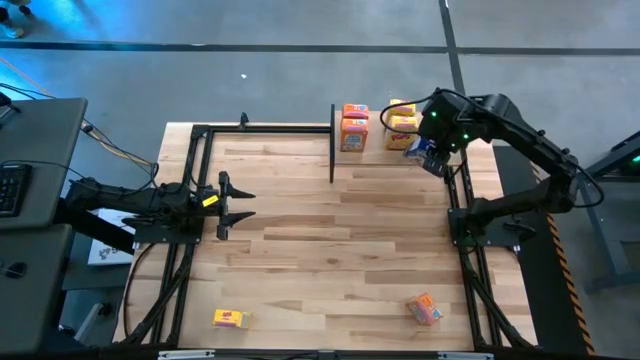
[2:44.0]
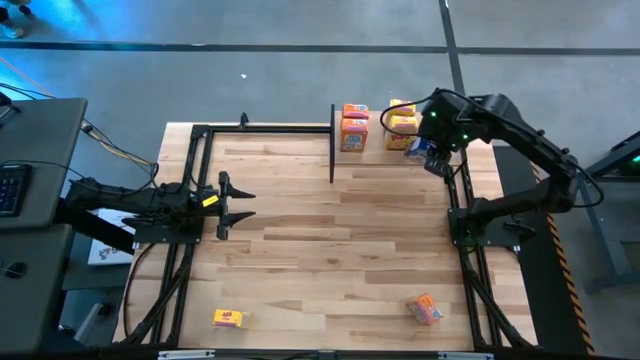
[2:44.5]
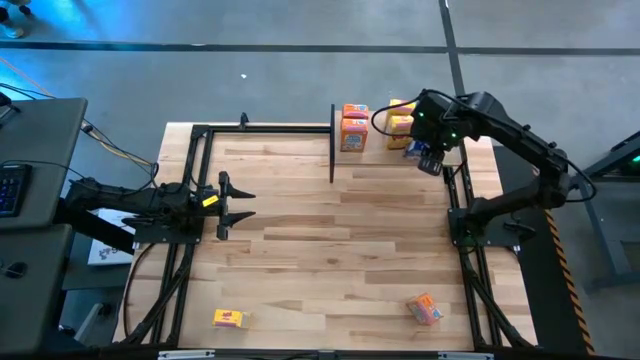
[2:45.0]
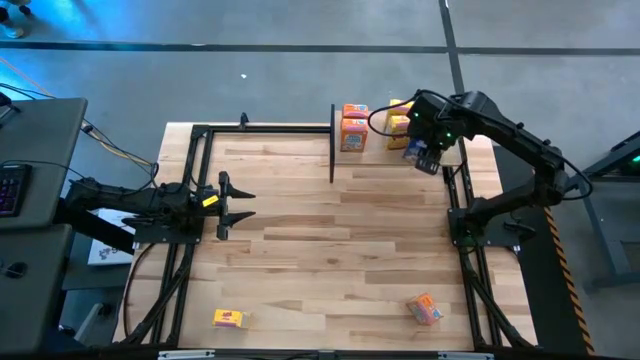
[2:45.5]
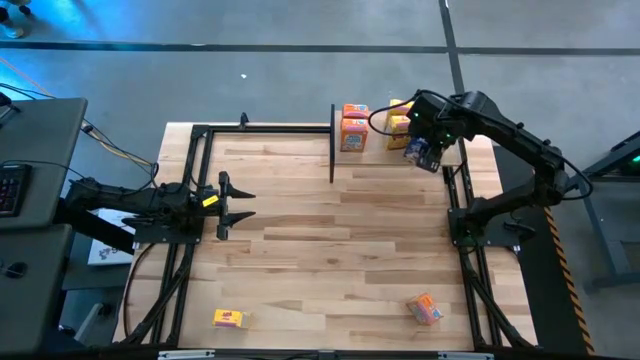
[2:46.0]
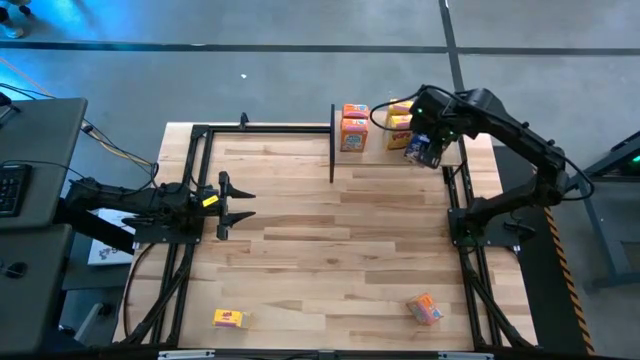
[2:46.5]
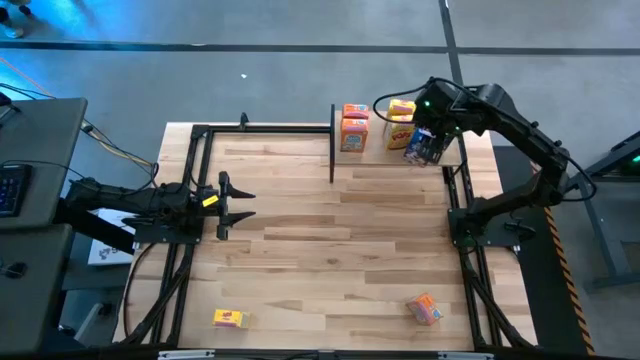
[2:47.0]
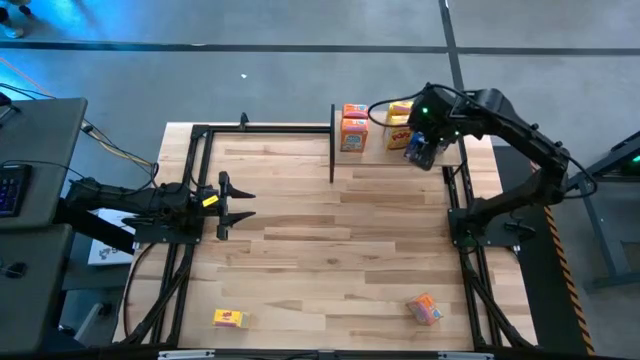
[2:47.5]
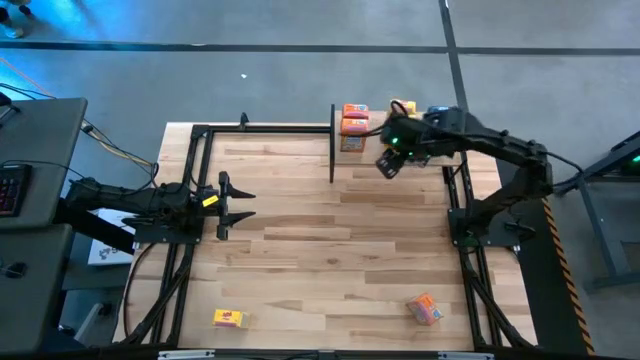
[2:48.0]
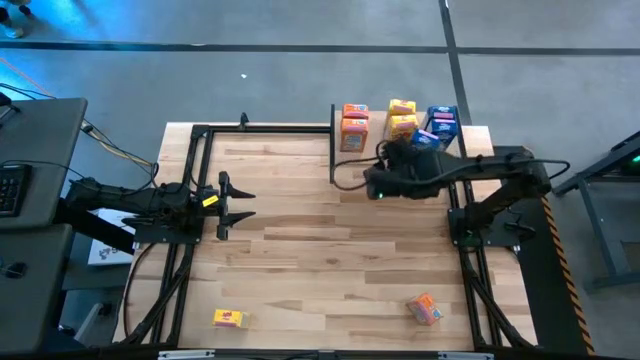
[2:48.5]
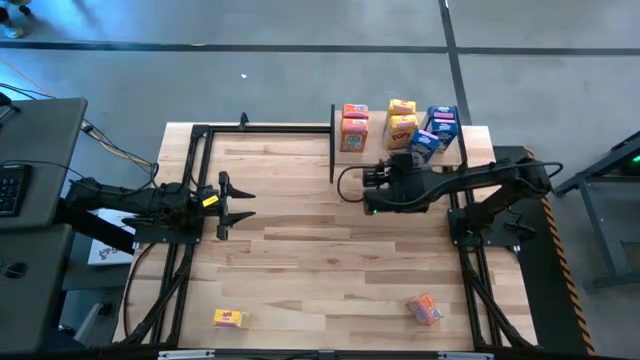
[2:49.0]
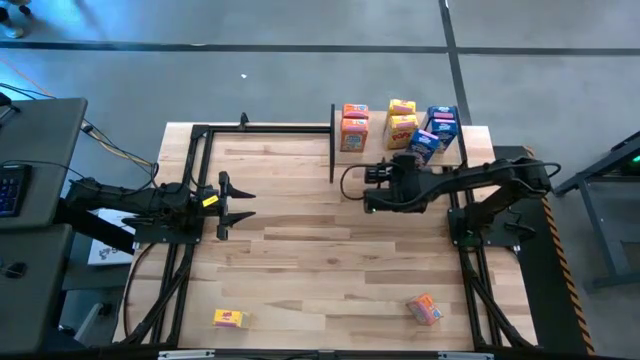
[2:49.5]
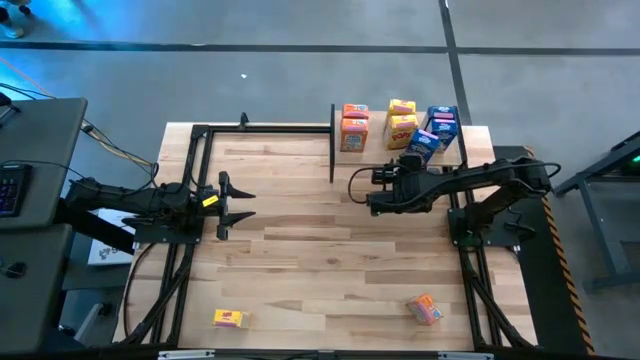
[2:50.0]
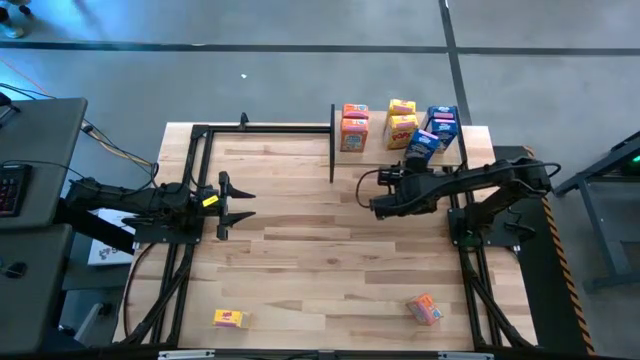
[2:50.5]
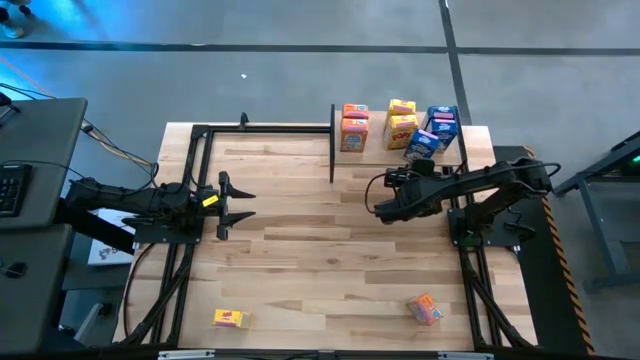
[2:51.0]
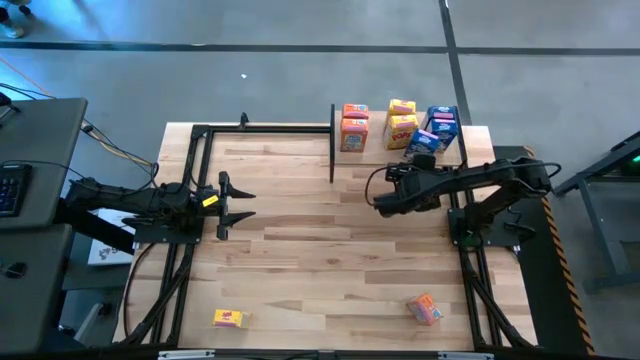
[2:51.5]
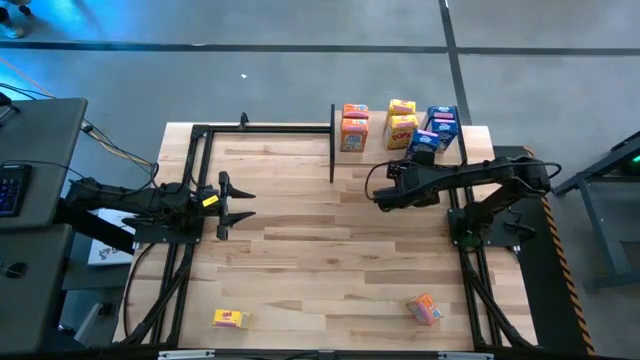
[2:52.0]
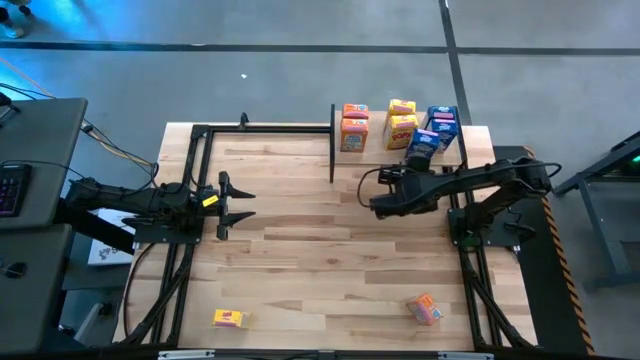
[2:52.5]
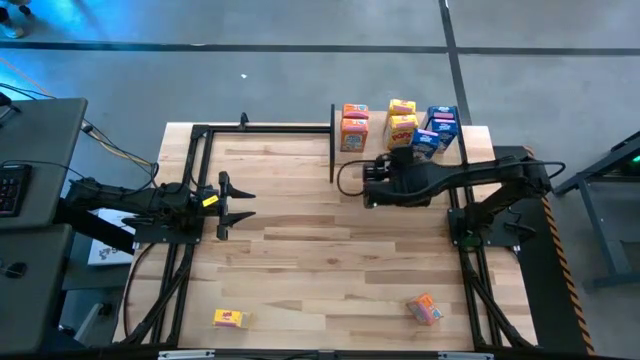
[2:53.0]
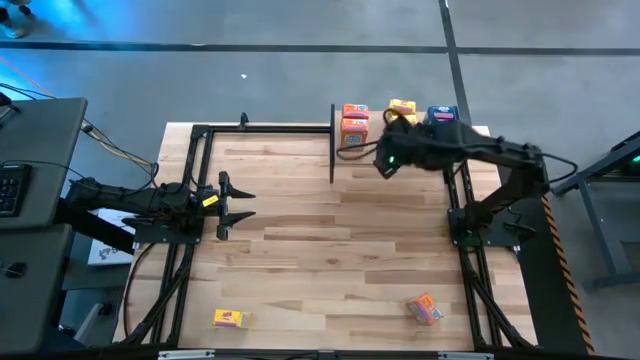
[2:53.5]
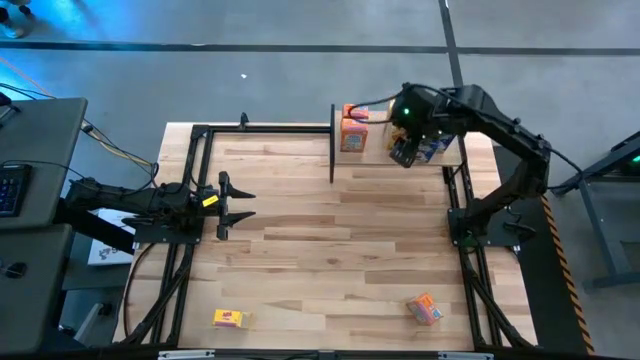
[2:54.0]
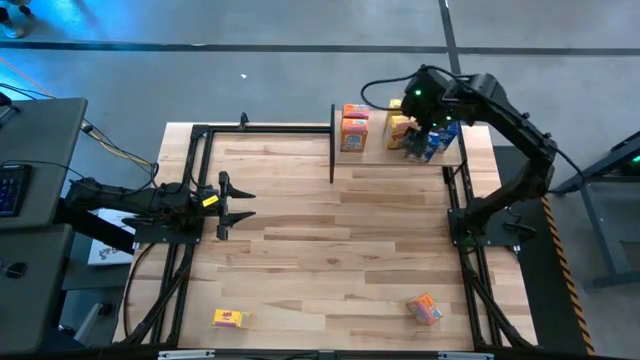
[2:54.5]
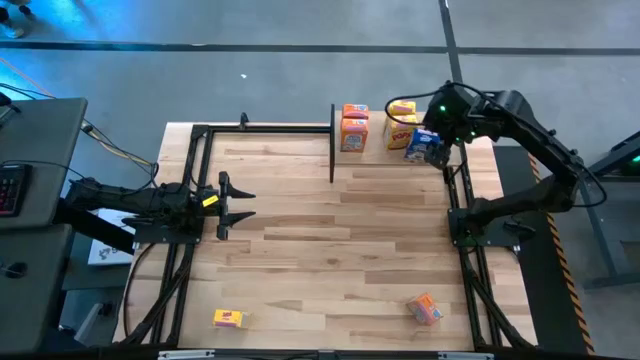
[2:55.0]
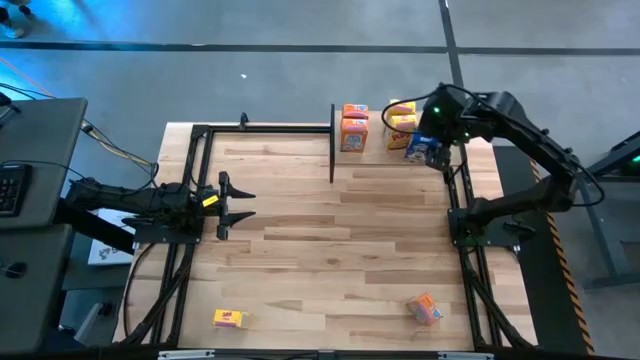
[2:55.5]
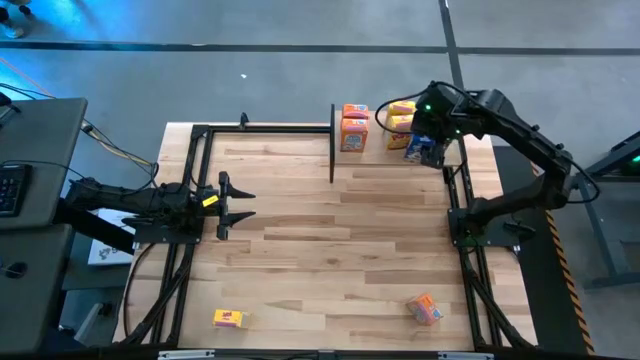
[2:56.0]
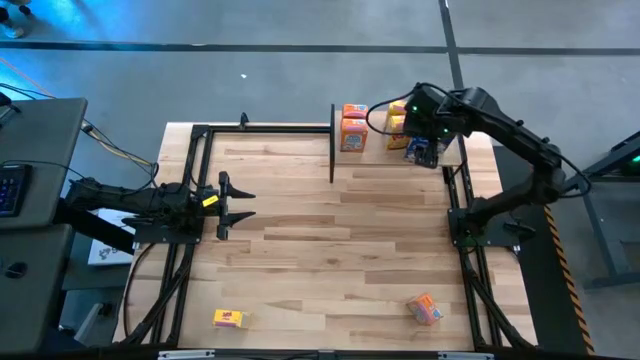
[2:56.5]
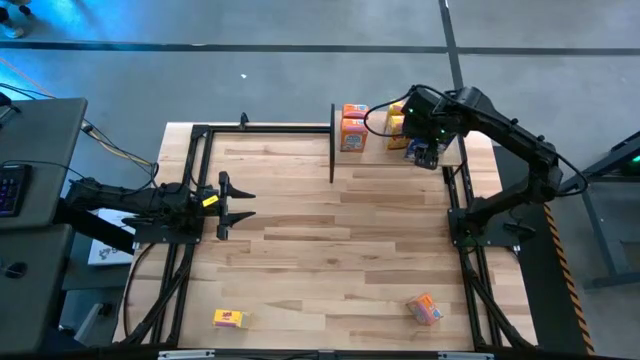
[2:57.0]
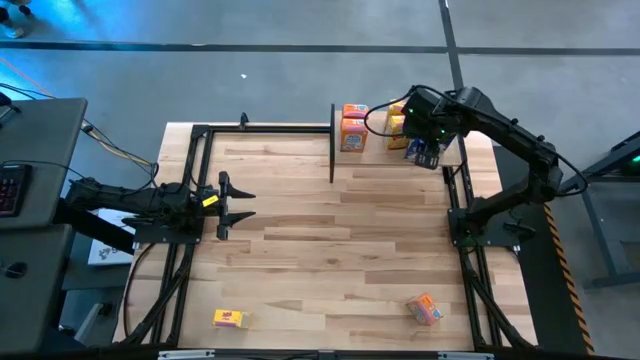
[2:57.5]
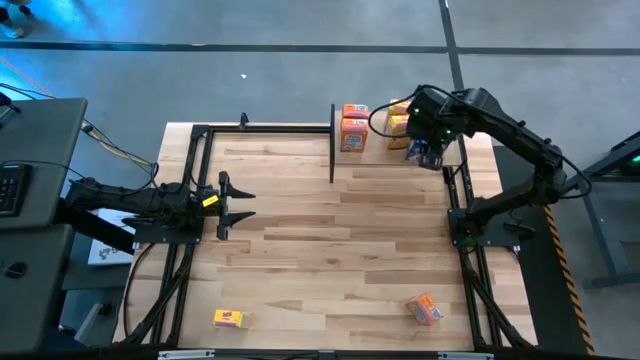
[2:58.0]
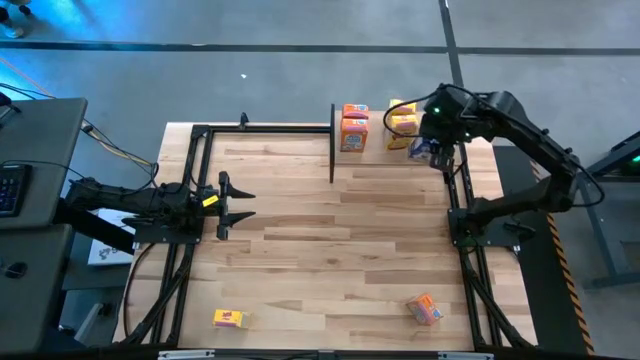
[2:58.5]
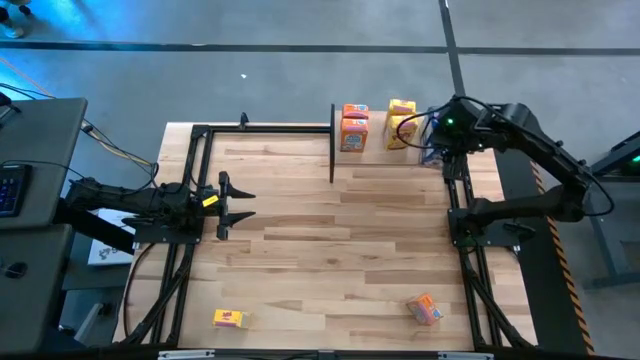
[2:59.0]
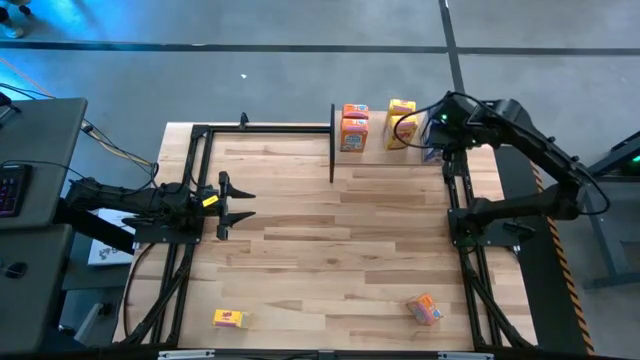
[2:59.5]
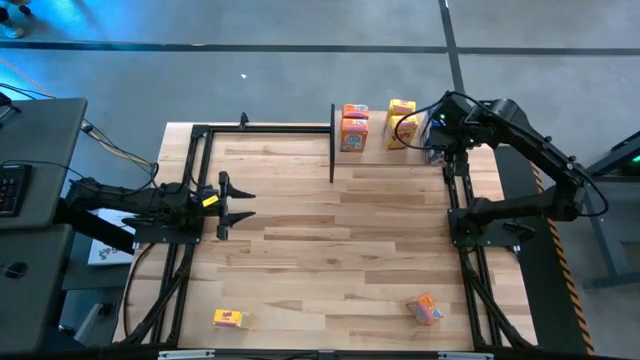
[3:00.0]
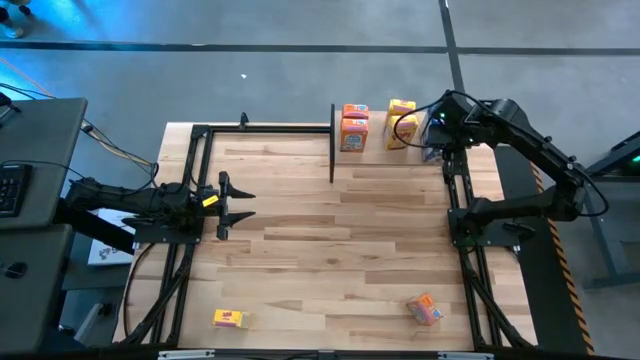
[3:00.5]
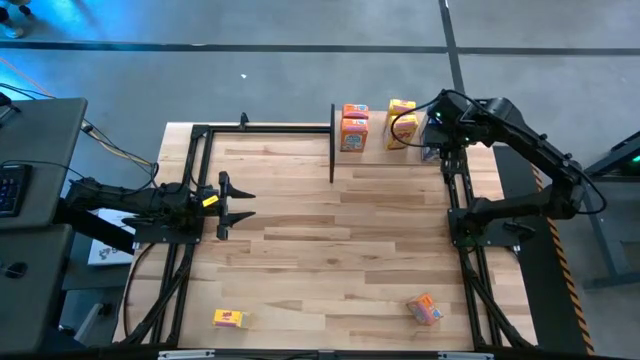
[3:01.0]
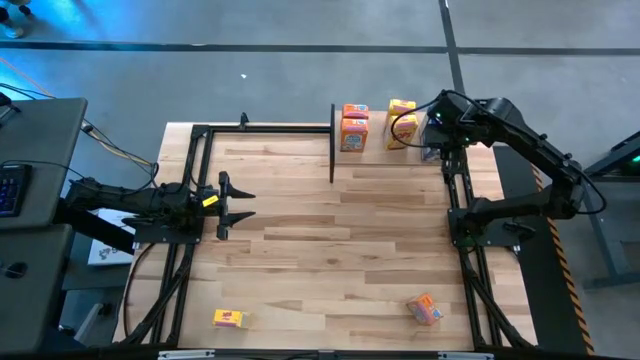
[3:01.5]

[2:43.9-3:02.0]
Task: Stack cereal on shelf
Put the blue cereal box on the shelf aligned with the other blue cereal boxes

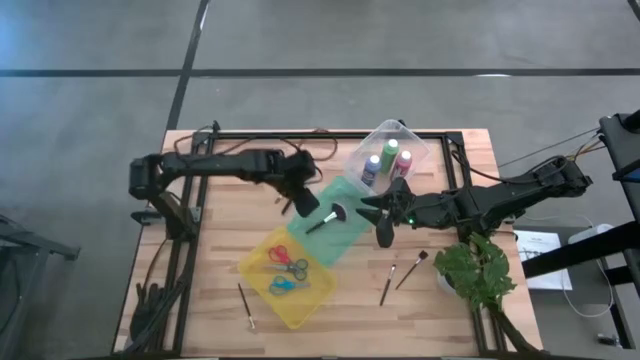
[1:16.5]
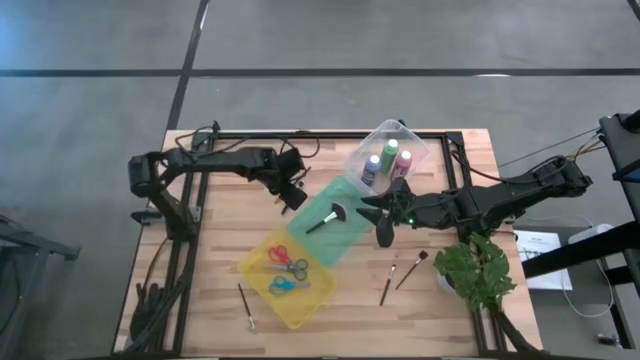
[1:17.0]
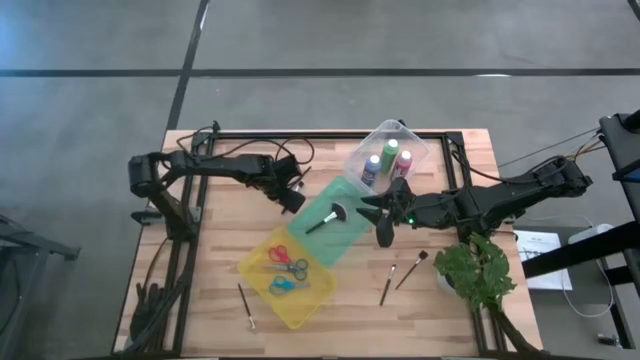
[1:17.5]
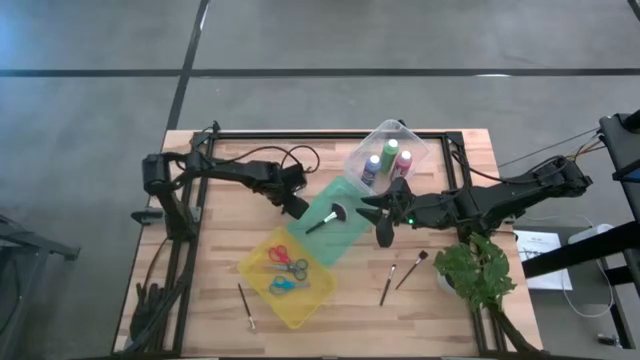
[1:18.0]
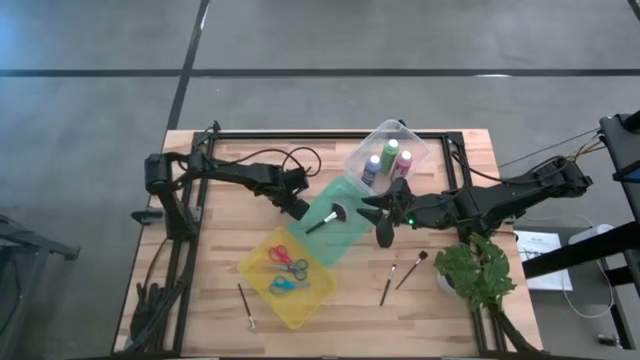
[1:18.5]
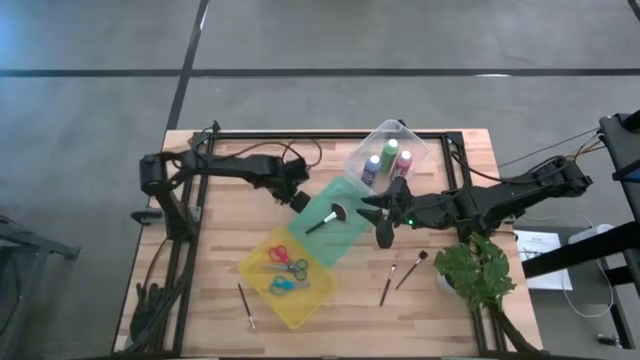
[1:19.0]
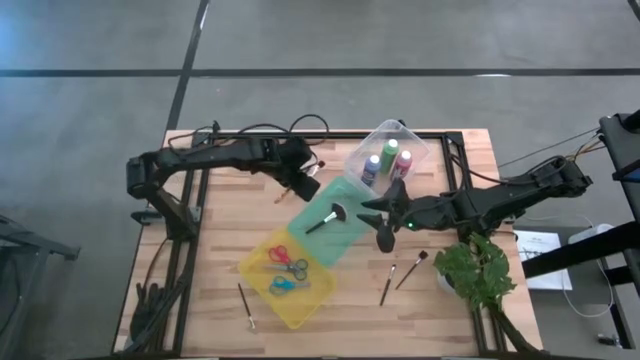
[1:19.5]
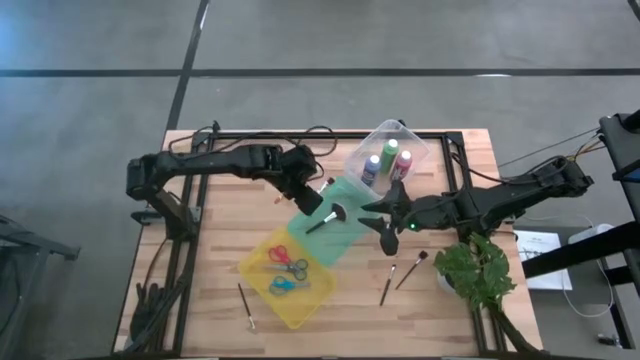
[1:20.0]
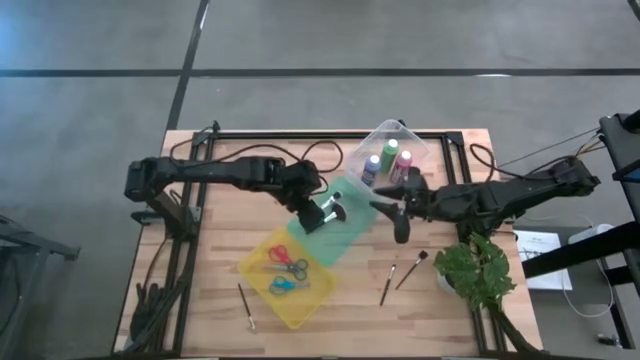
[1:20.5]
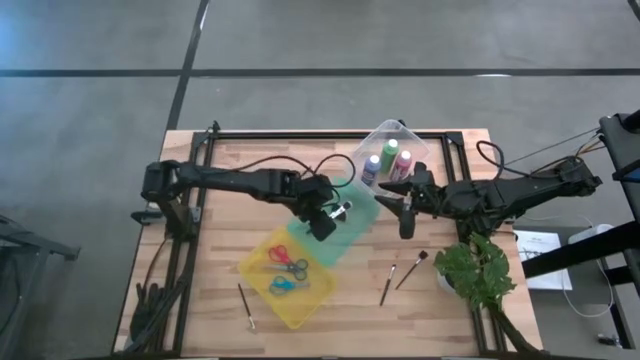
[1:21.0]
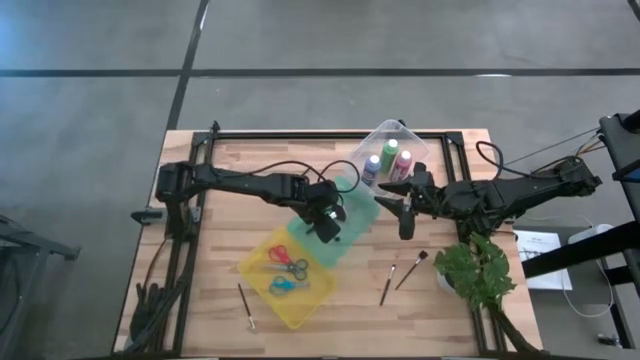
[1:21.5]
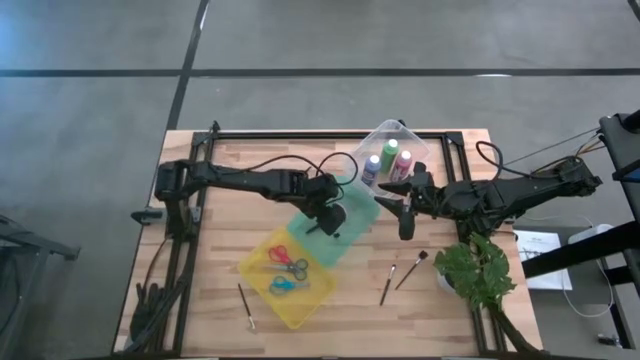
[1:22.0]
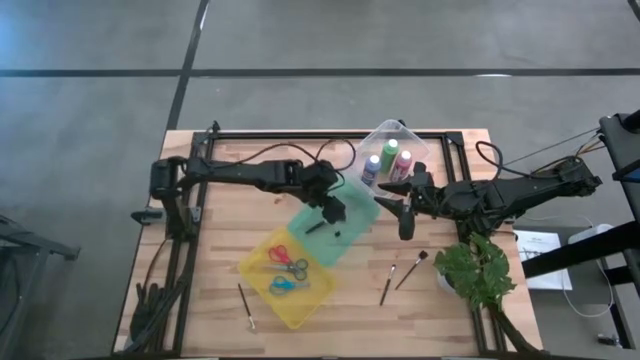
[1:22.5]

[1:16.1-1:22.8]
Task: Pick & Place Paint Supplies
Put the black foundation brush into the green bin
